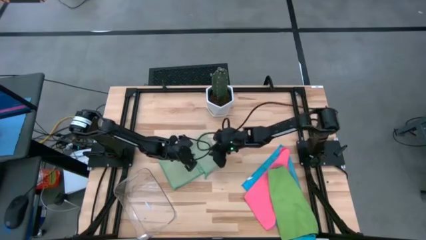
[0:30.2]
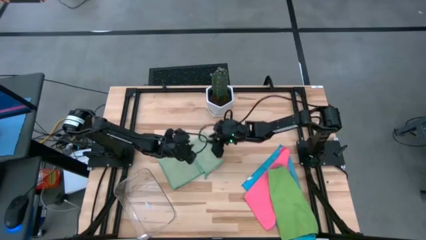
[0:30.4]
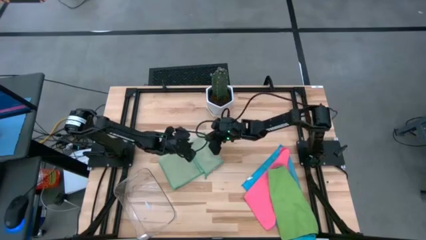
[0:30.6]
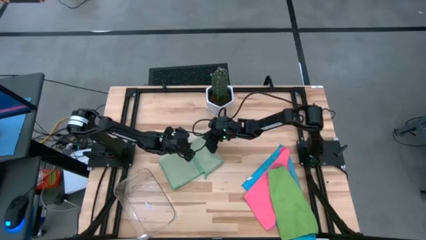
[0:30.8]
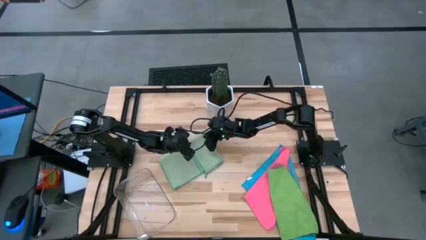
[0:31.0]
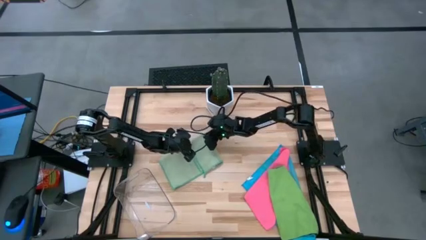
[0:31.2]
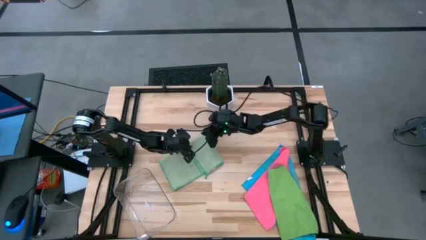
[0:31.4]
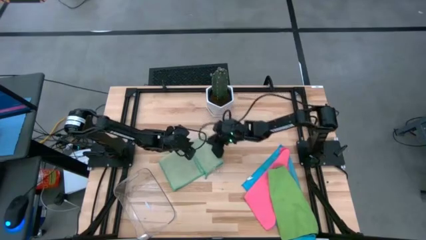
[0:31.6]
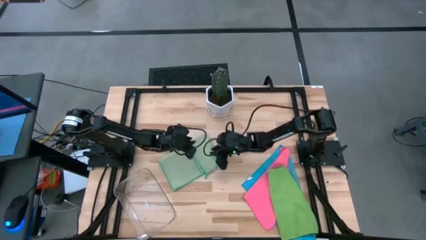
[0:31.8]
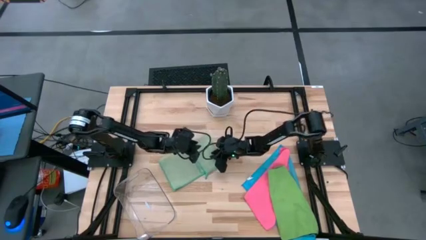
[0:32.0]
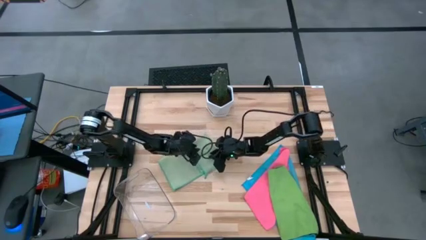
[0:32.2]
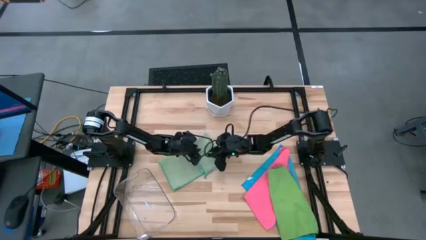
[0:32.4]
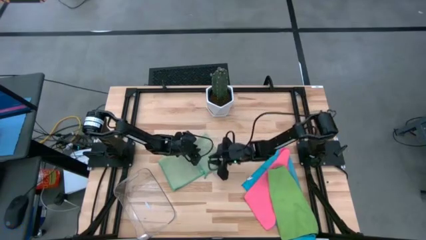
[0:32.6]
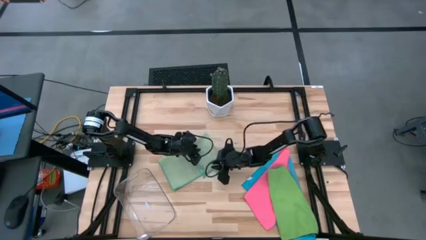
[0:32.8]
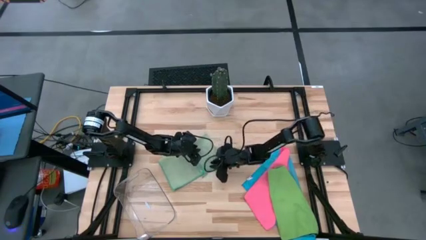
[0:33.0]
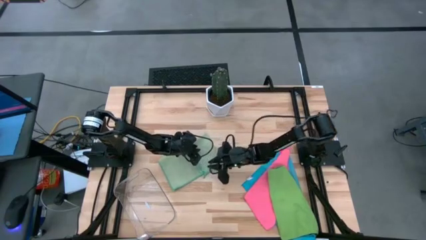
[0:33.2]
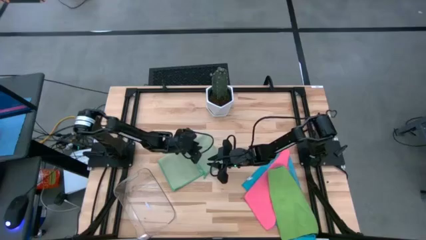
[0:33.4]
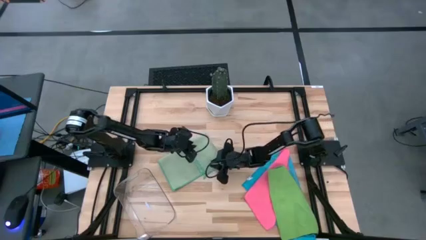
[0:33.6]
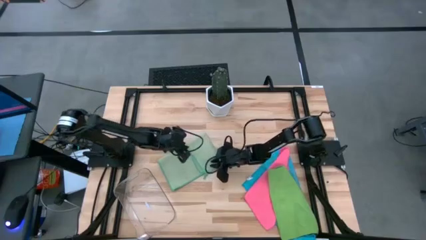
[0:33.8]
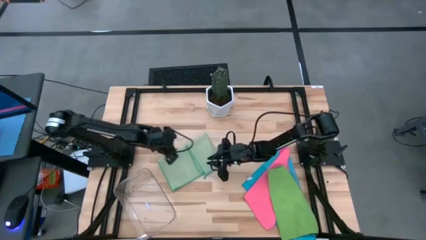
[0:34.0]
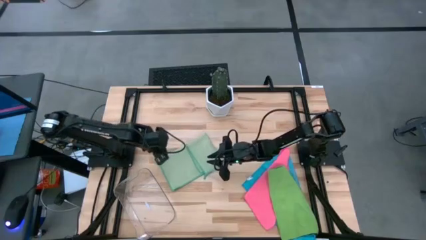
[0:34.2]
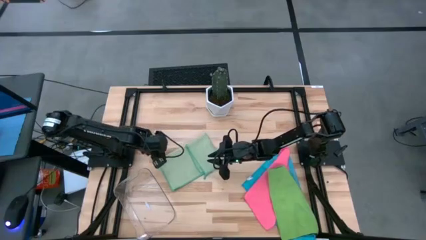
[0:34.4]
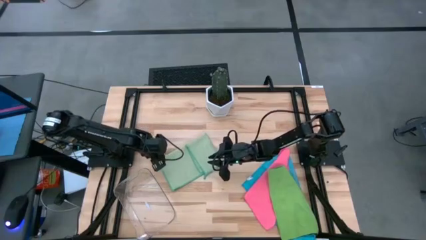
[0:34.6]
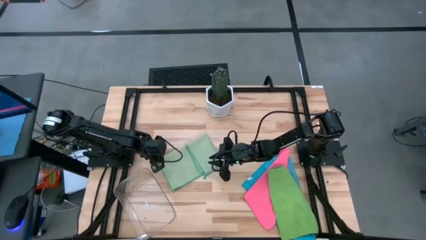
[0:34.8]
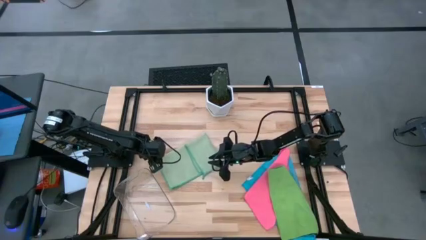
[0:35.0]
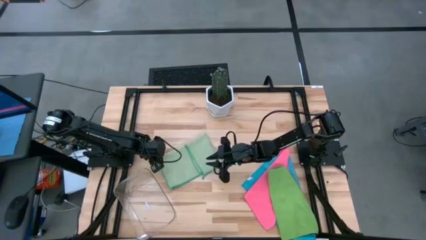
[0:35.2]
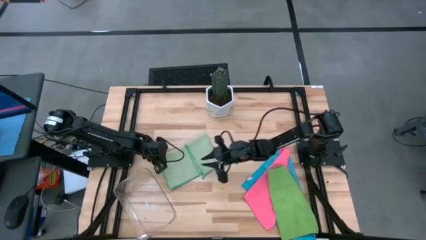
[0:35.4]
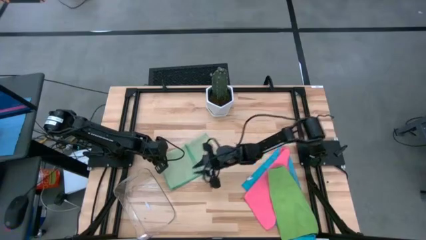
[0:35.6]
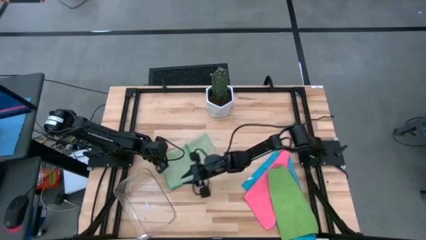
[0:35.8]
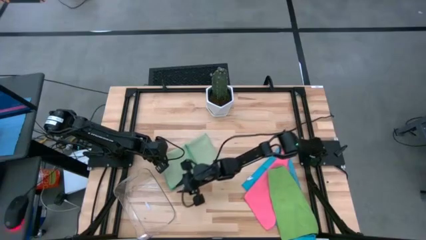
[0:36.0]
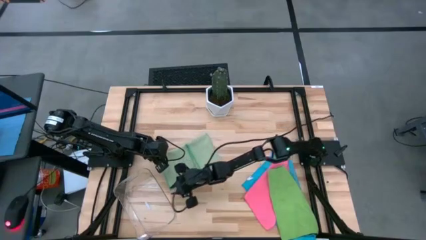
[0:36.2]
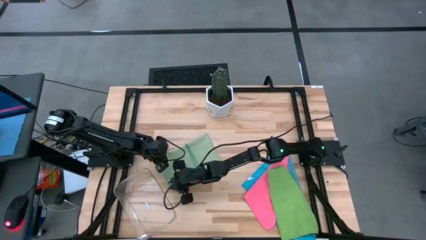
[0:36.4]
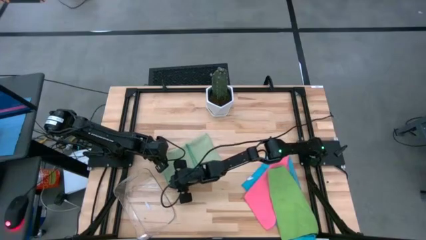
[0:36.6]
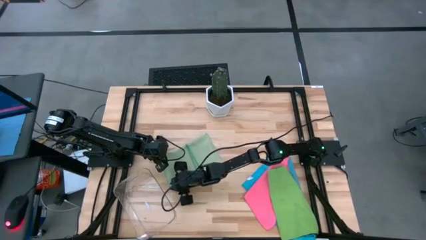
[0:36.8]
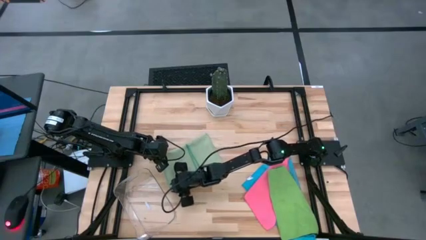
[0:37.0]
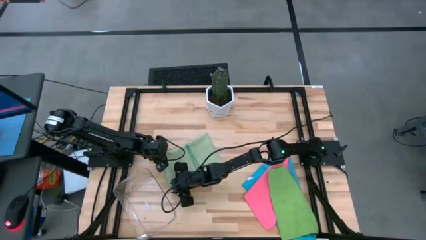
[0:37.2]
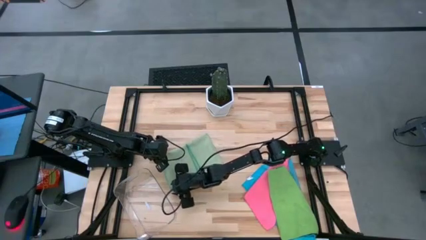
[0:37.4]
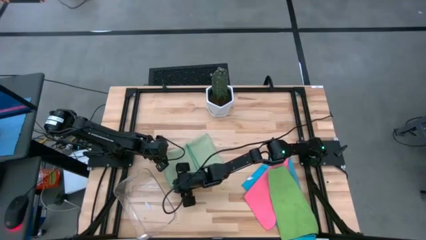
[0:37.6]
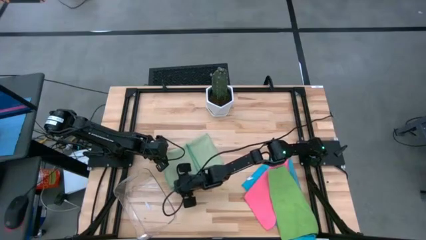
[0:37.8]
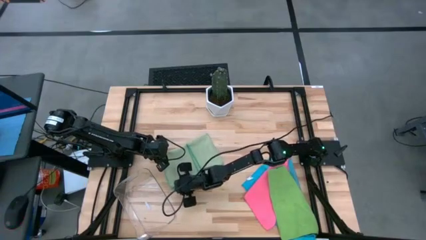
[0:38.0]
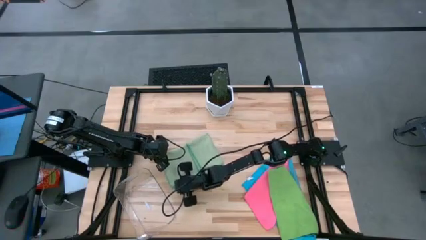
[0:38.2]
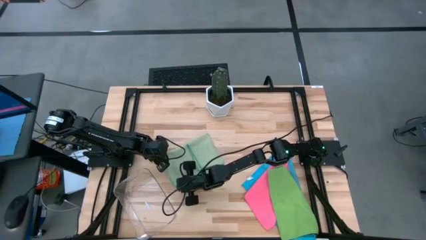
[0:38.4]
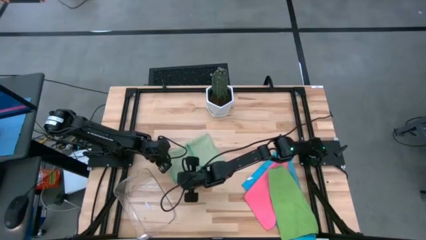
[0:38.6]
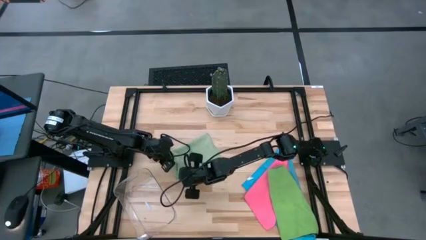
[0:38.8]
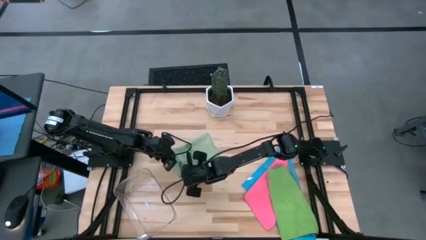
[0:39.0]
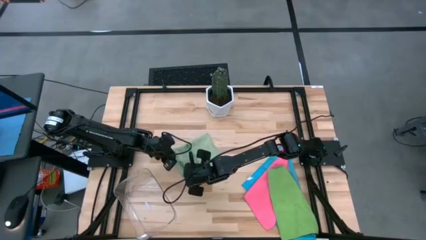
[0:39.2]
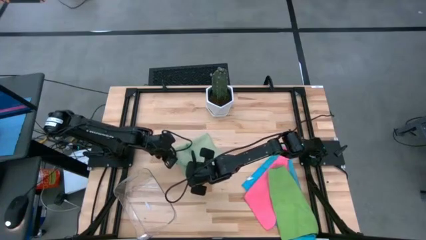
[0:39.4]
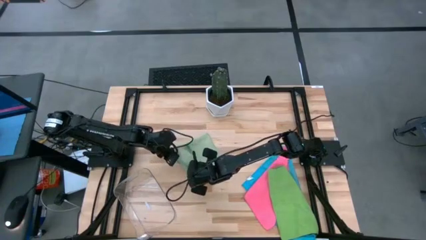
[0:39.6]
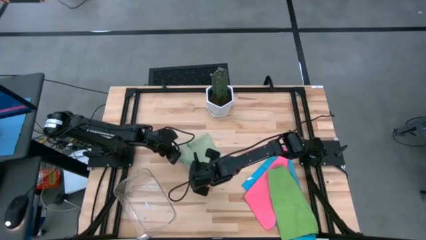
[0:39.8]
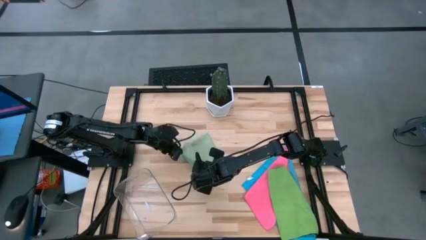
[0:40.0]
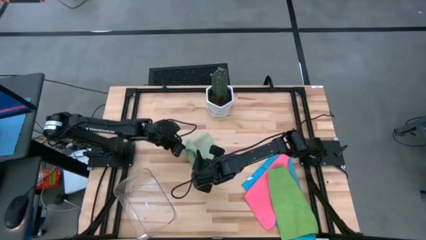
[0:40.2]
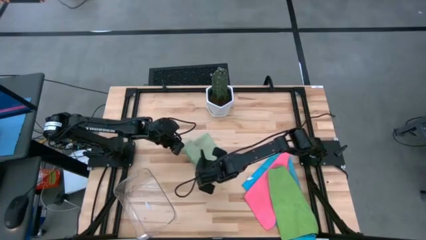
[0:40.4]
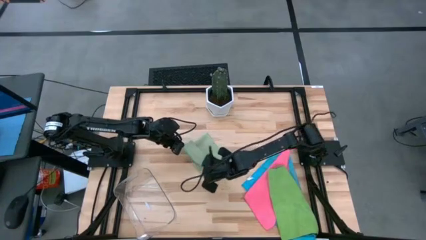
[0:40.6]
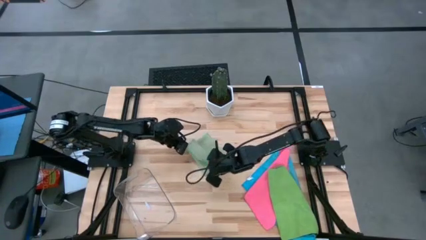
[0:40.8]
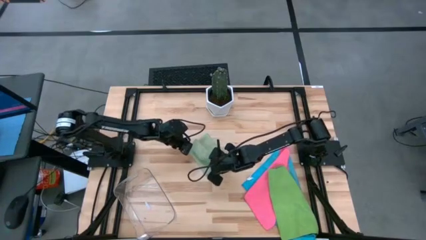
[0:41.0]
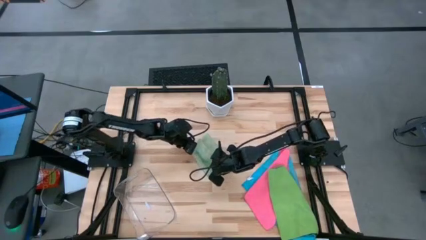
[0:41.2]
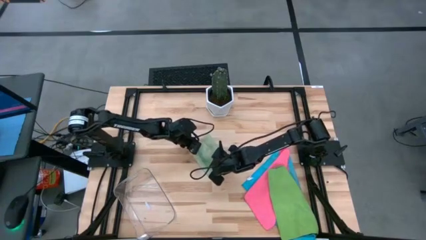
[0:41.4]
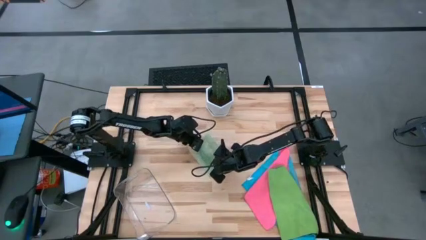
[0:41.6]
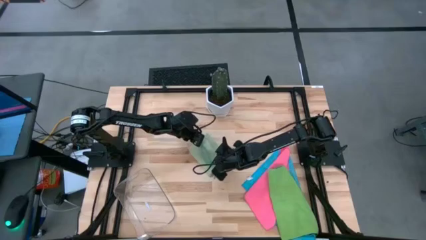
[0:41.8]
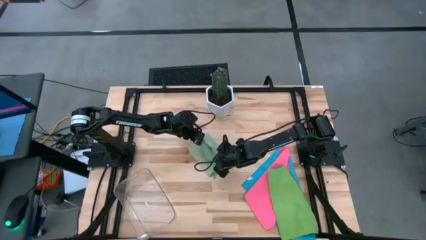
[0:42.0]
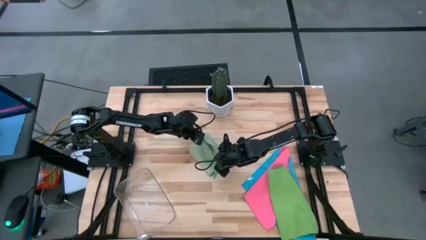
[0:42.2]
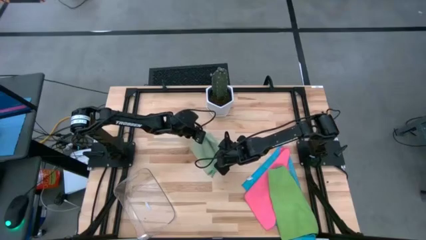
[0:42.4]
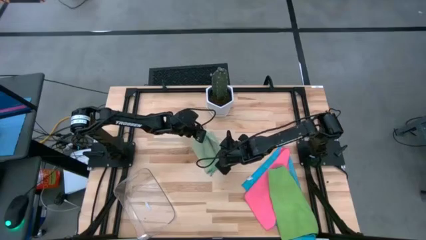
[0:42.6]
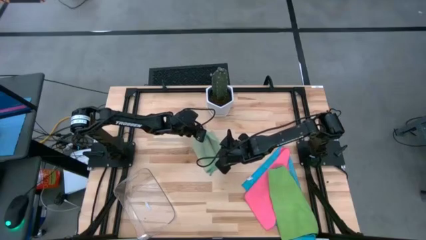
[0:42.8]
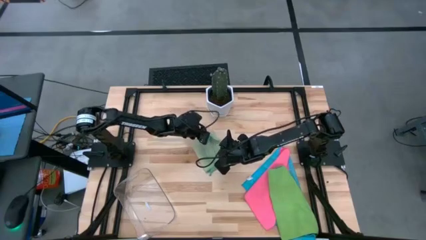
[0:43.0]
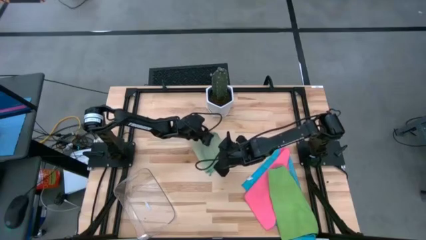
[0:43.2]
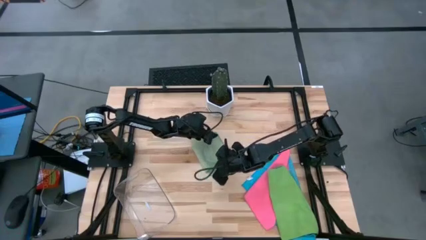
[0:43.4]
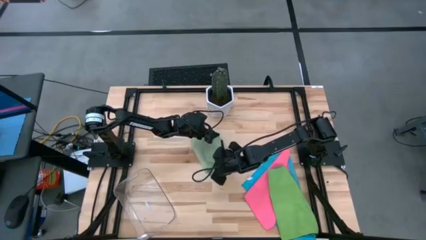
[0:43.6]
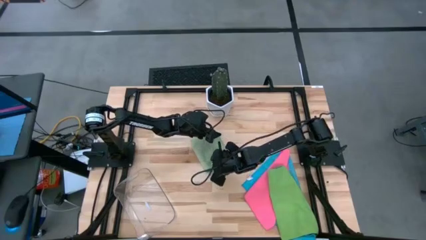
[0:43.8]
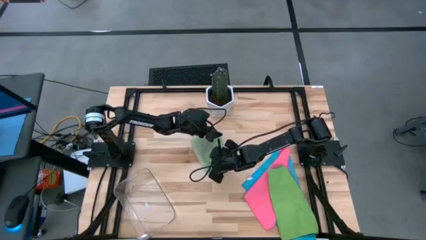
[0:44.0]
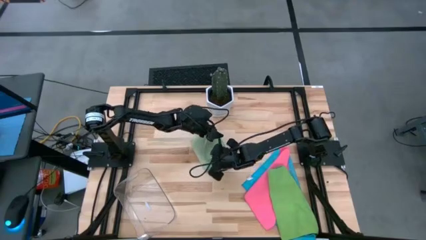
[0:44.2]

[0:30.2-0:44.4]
Task: Fold microfiber towels
Fold the light green microfiber cloth

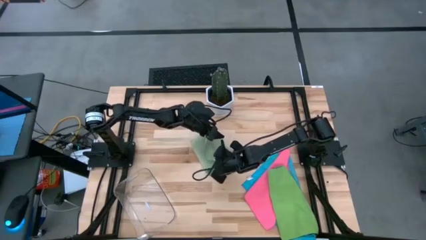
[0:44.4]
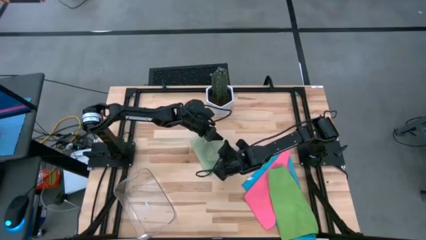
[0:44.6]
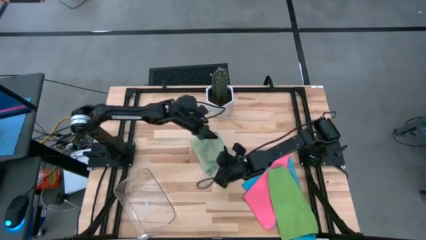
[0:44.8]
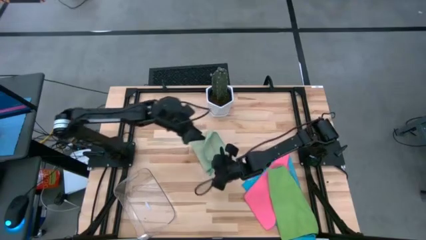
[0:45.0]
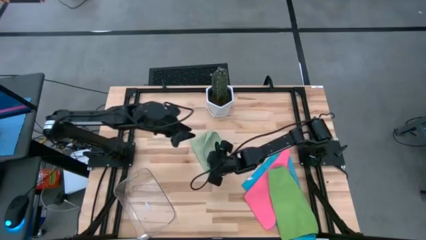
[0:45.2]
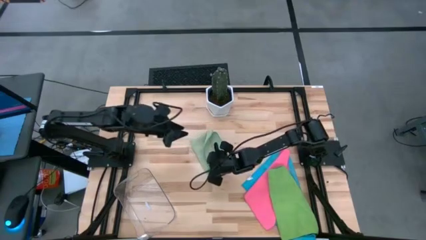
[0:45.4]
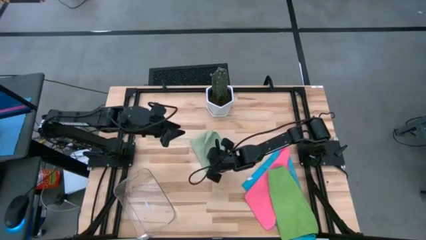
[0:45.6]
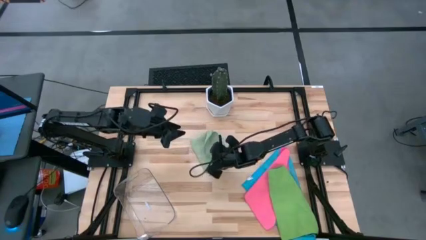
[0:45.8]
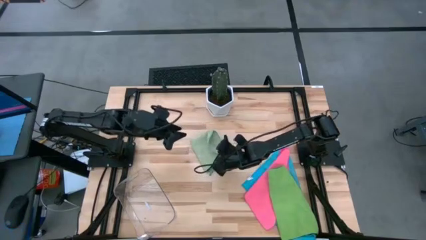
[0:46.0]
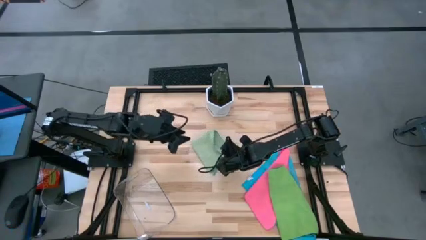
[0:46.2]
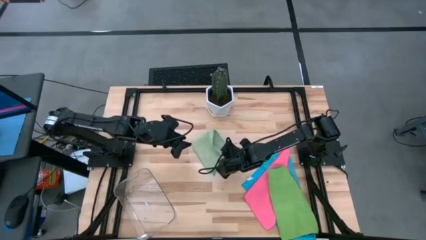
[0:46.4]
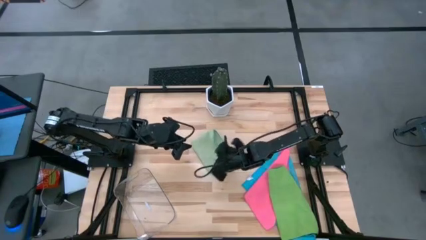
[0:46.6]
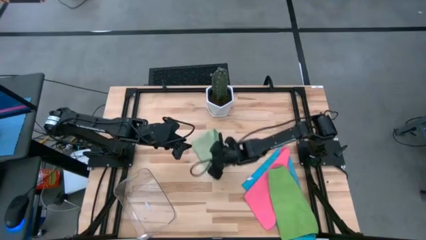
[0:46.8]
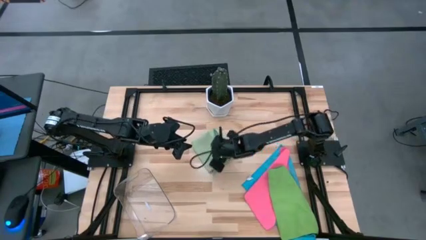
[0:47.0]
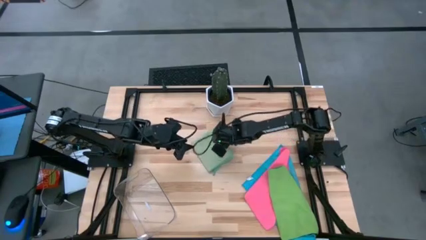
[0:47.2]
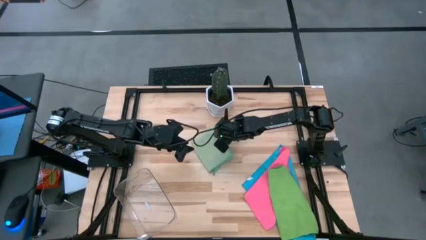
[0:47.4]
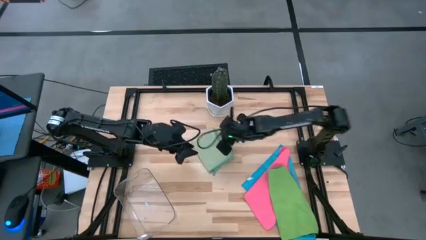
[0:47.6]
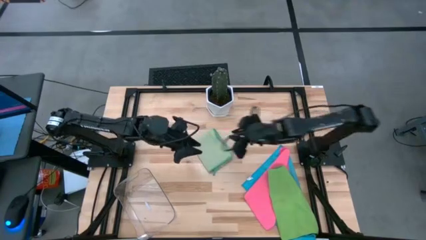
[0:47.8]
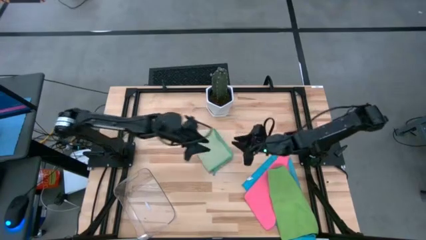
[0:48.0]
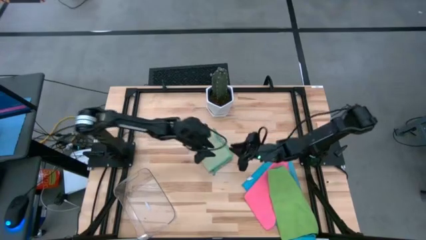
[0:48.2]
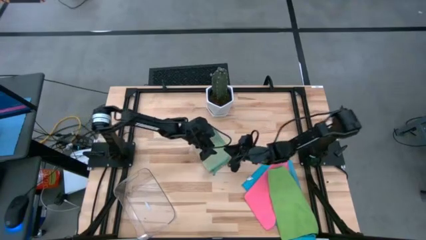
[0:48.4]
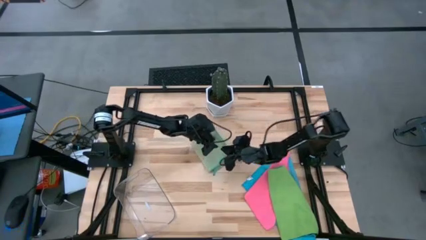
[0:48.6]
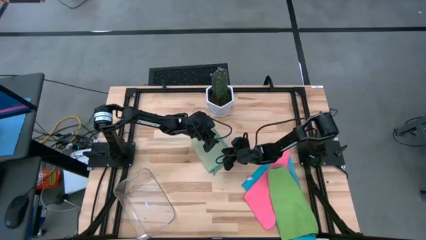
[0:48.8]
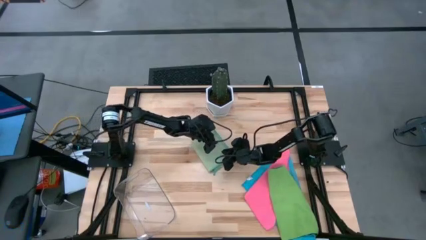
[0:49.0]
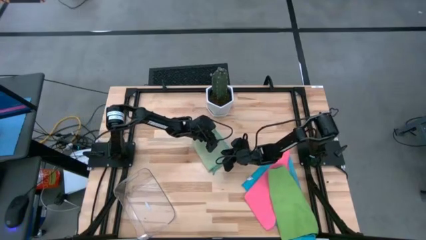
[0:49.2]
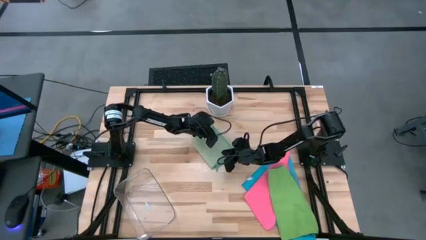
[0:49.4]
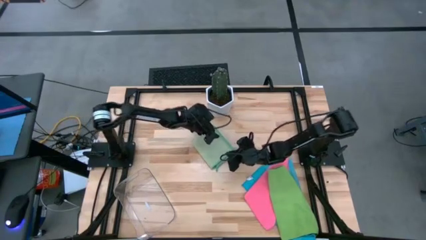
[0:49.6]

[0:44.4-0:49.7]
Fold the light green microfiber cloth
